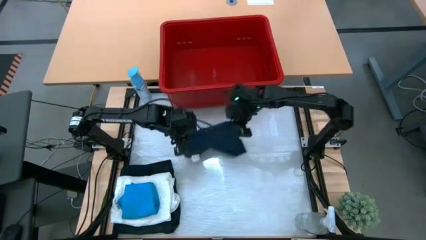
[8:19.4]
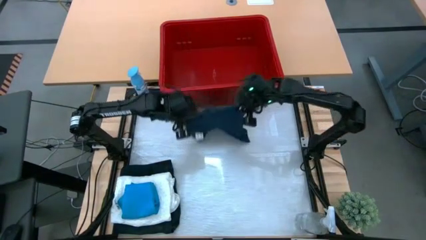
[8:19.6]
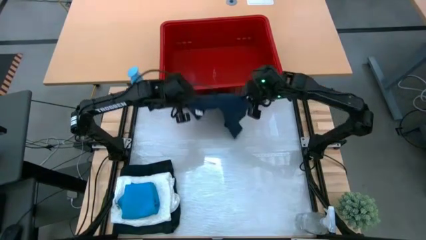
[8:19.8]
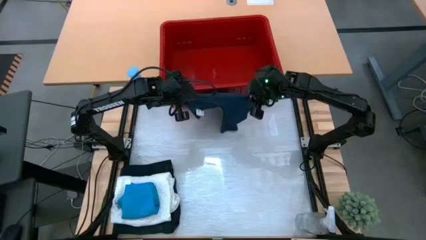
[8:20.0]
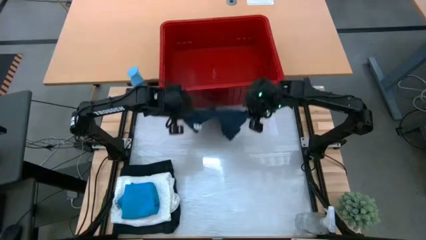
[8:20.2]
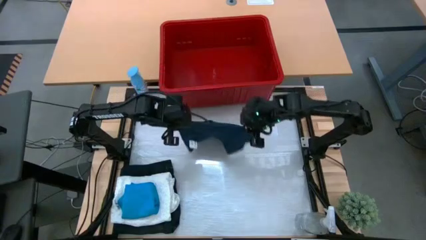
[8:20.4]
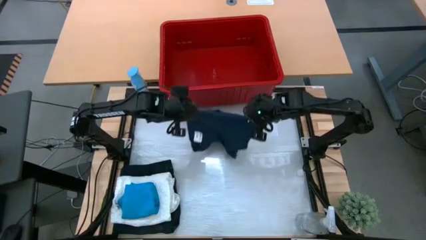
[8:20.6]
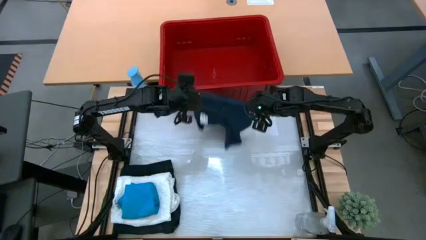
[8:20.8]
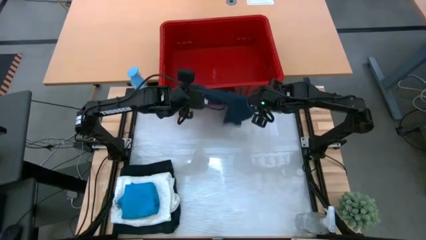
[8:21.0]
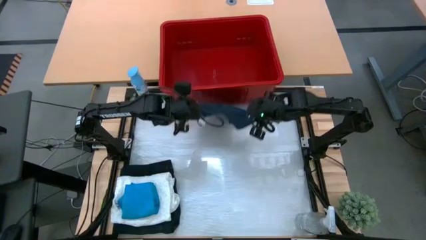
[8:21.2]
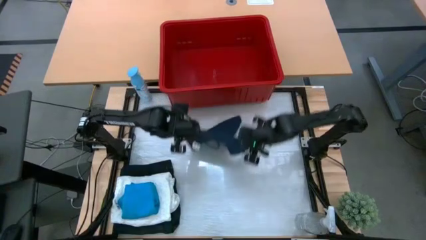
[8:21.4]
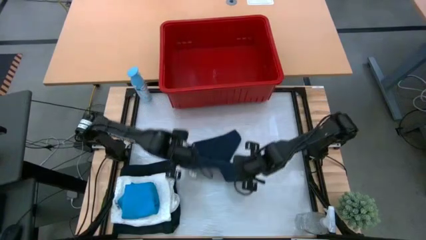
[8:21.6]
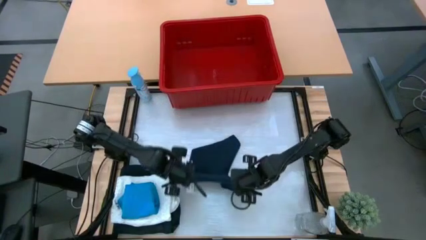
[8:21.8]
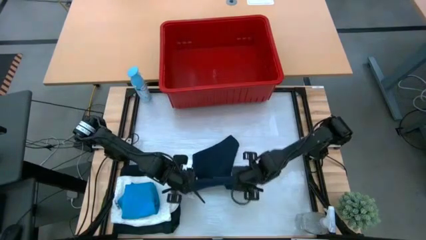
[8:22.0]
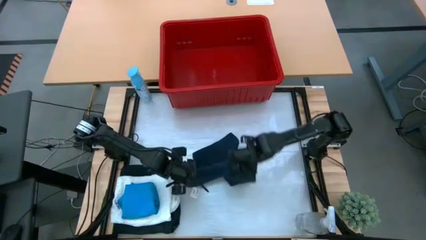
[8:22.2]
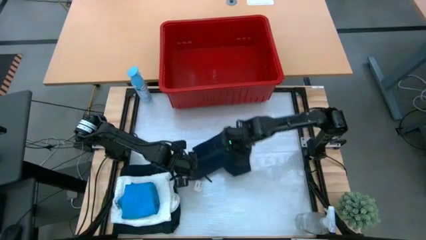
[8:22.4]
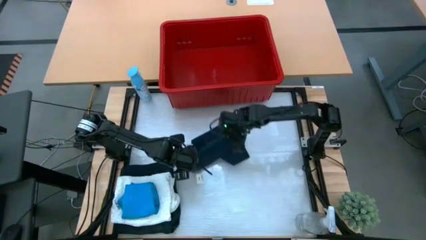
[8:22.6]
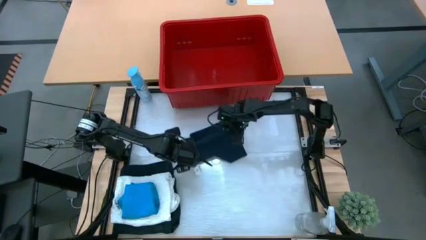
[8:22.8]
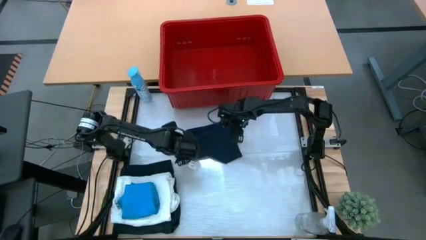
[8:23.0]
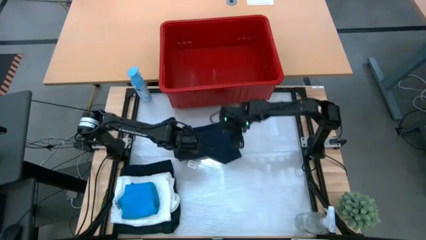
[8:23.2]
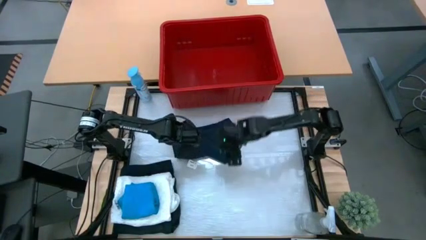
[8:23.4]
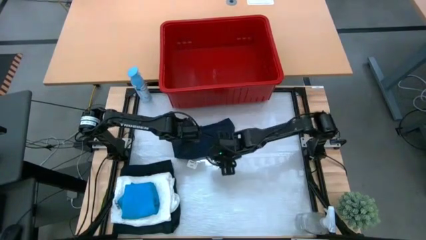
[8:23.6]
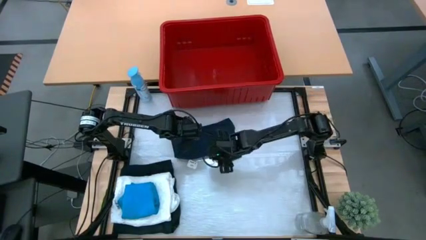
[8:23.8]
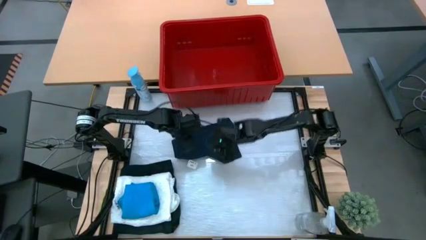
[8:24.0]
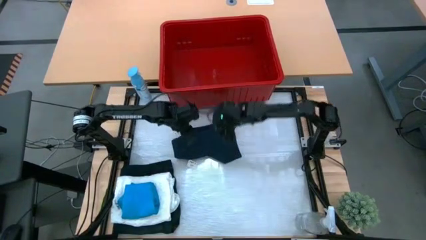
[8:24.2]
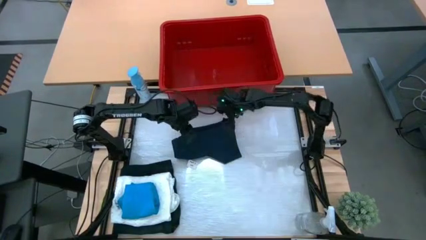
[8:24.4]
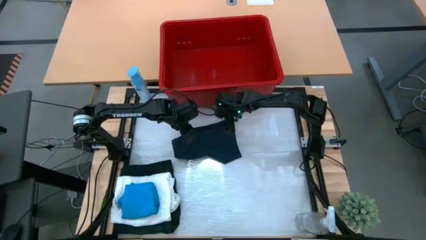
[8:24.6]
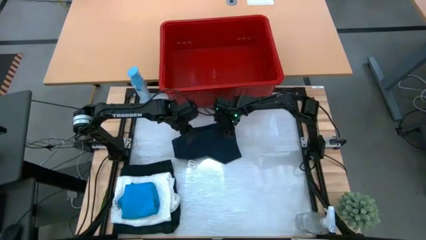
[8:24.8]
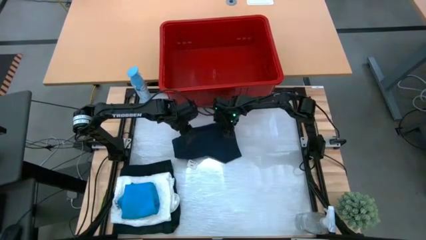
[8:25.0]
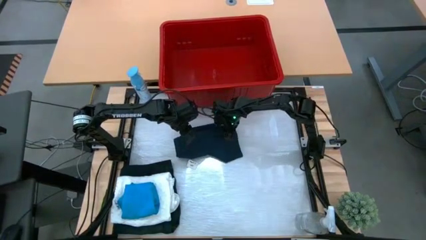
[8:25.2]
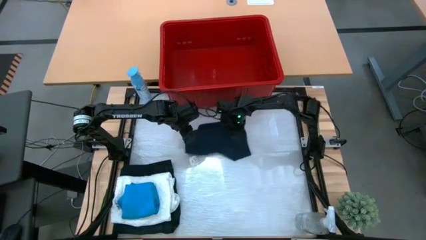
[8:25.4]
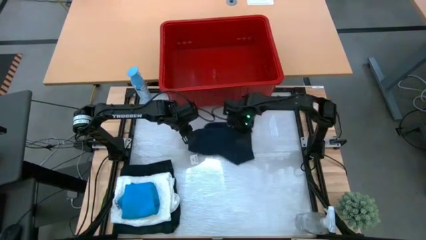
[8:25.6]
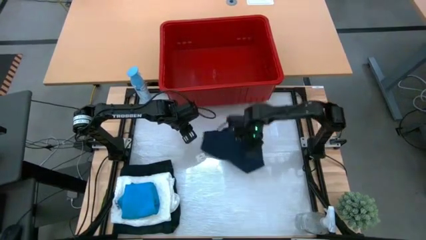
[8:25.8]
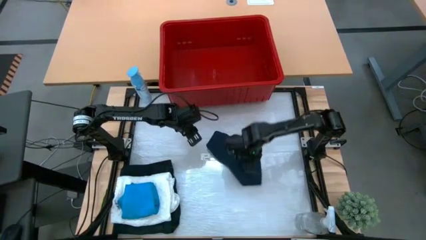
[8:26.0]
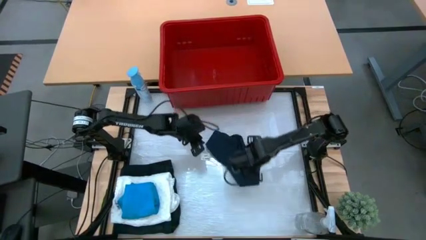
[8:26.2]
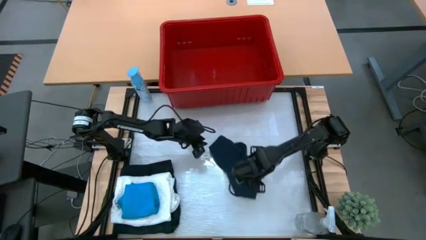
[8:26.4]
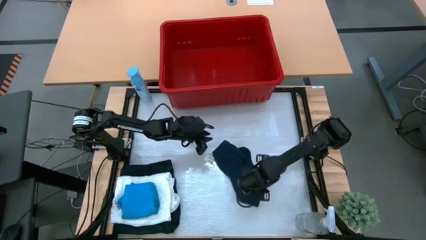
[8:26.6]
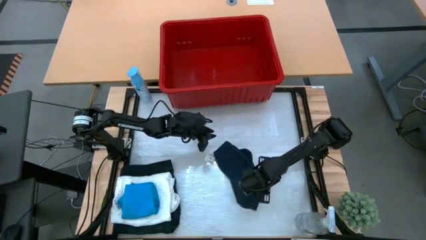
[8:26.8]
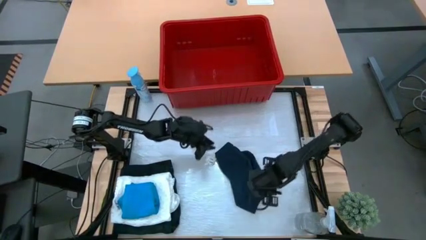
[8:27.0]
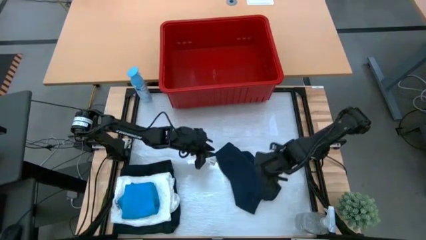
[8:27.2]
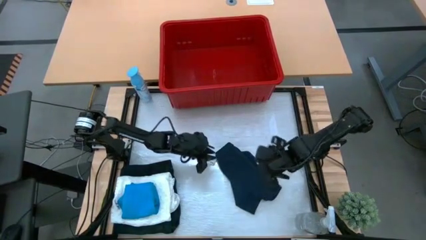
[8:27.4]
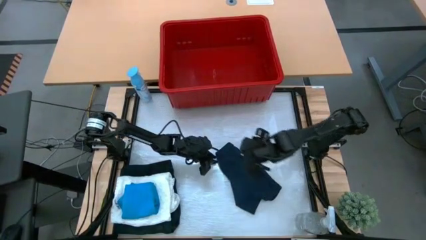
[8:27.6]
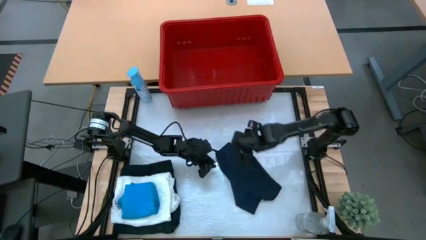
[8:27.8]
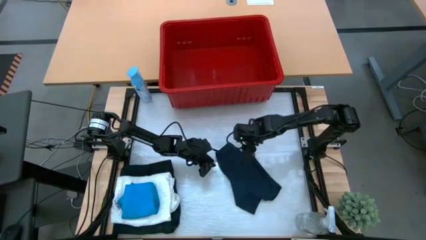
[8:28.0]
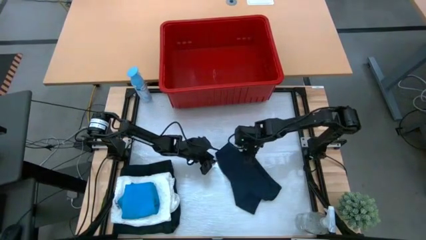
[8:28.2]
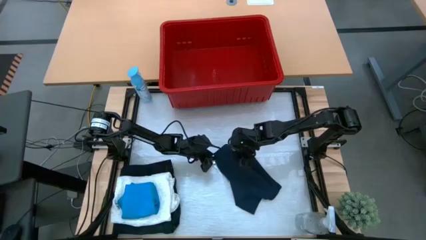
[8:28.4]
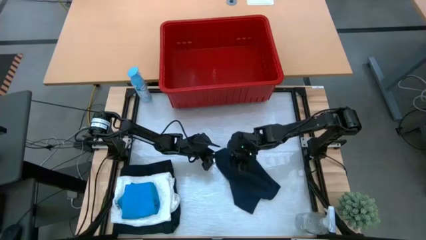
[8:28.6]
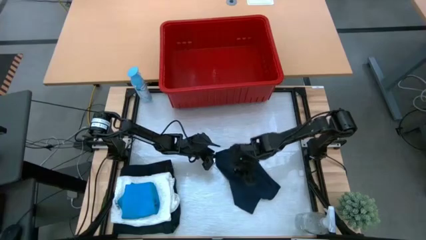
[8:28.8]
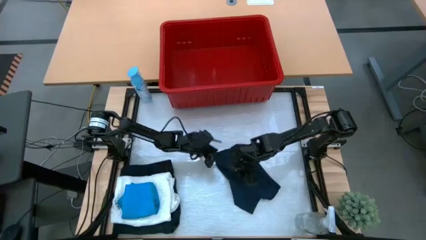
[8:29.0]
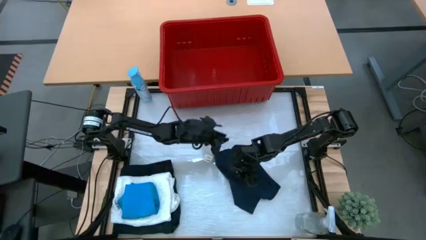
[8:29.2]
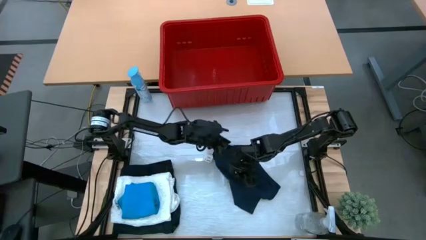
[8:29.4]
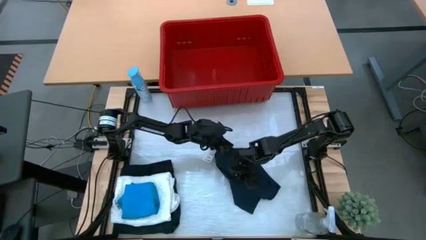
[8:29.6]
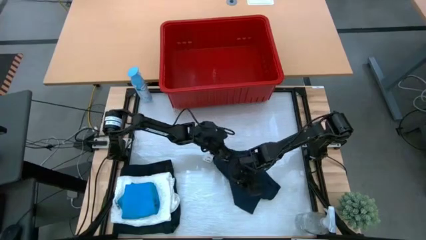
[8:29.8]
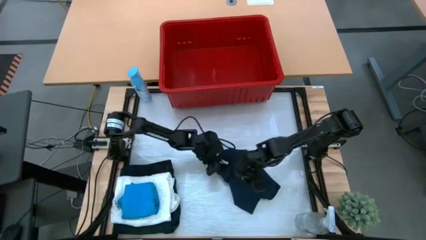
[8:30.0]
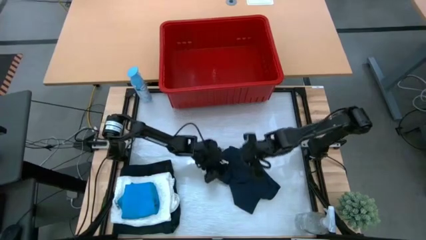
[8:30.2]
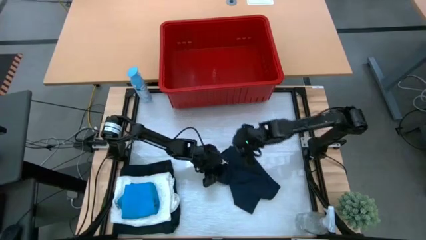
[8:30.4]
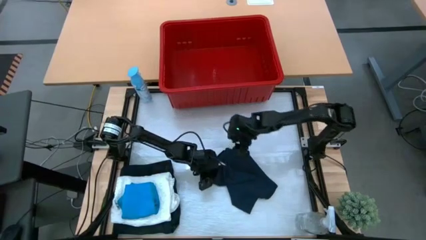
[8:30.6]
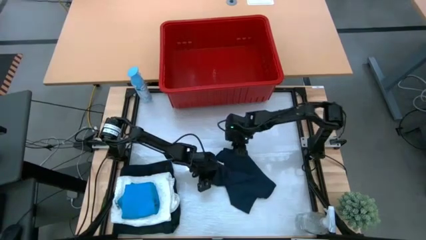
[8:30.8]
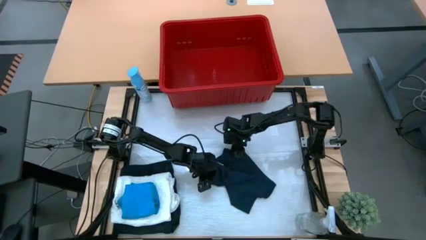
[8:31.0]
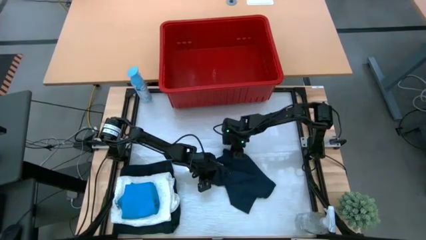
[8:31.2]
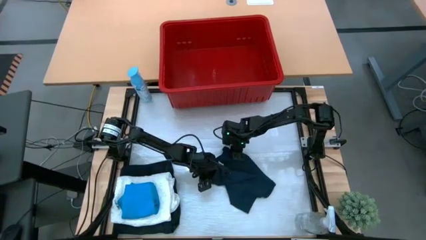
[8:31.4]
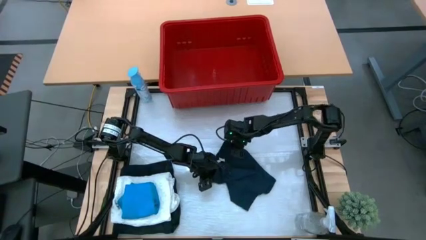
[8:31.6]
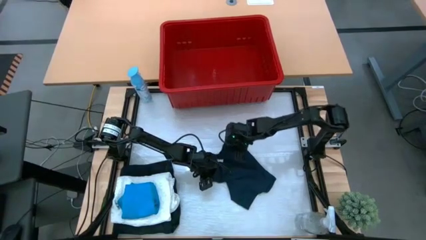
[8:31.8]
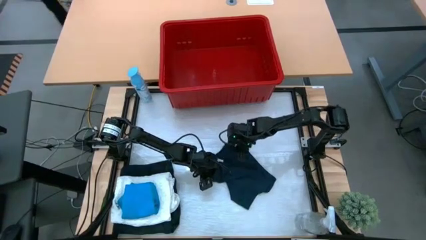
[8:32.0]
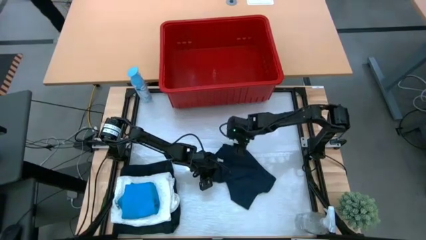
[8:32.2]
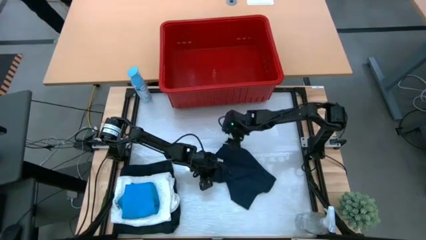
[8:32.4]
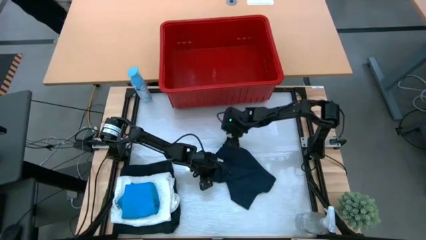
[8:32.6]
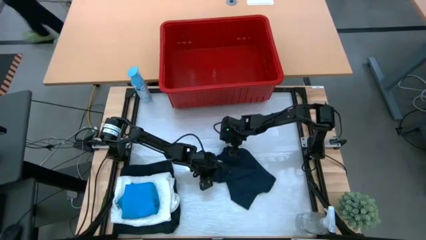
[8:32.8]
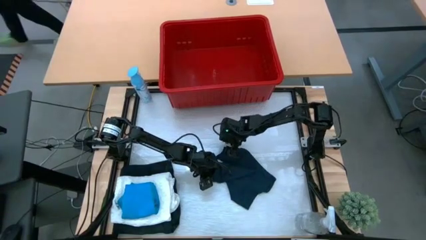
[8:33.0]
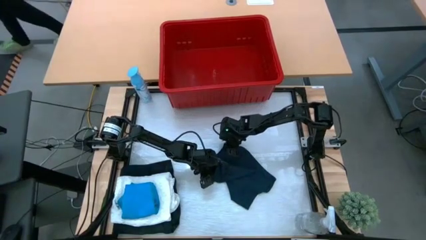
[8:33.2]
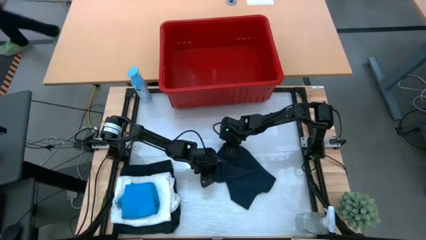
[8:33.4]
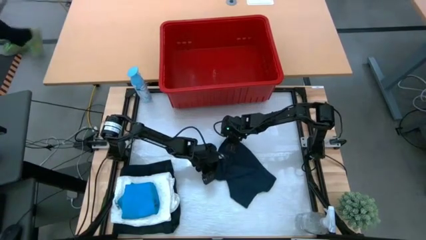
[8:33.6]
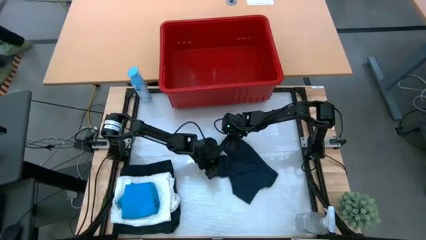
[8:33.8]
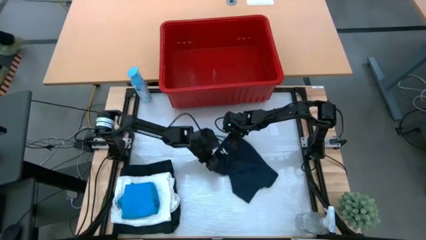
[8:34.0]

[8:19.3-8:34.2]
Task: Fold Laundry from Bin
Fold the gray shorts from the red bin

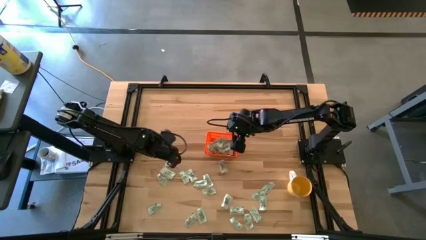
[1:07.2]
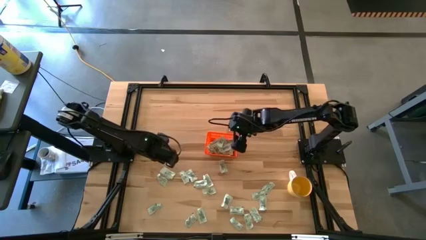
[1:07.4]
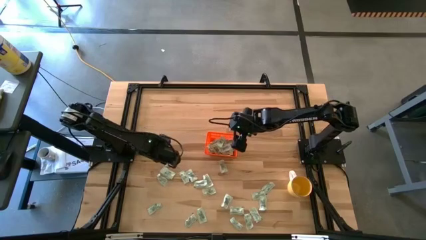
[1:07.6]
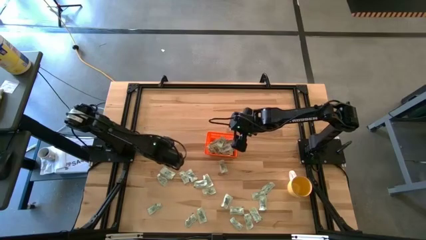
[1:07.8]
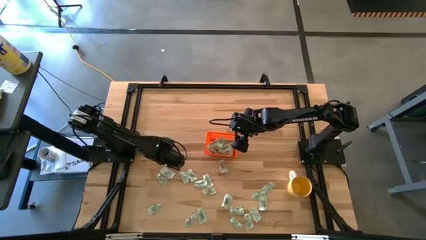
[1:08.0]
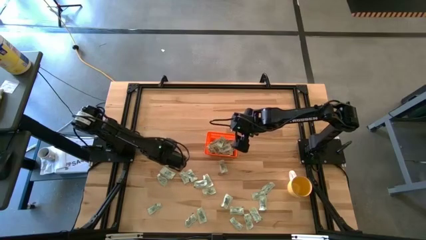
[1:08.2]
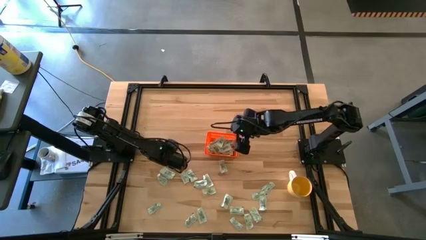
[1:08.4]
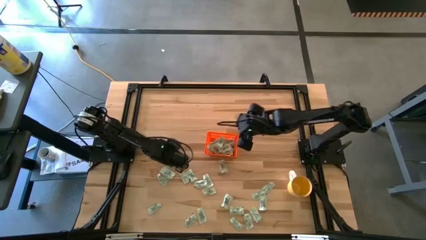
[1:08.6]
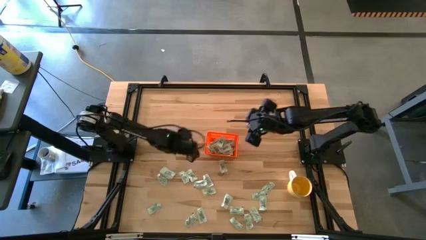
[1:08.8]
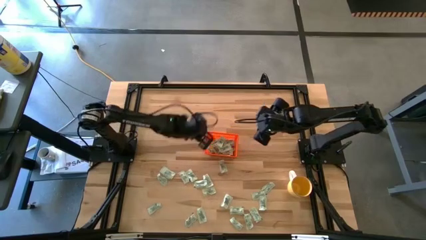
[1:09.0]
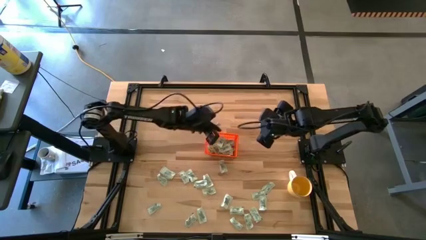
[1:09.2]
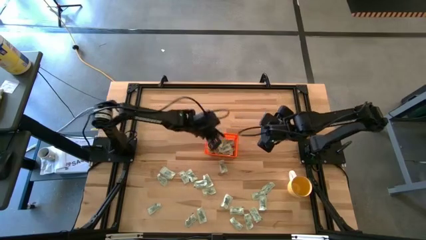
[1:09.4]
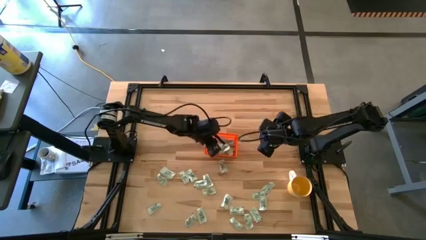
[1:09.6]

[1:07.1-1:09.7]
Task: Pick and place Stevia / Truvia into bins
Put the light green stevia packet into the orange bin
